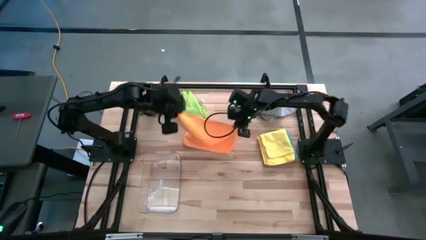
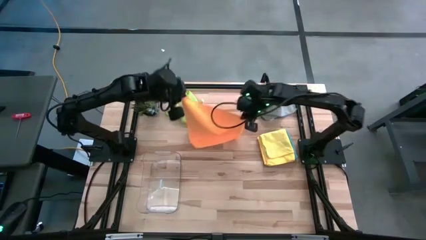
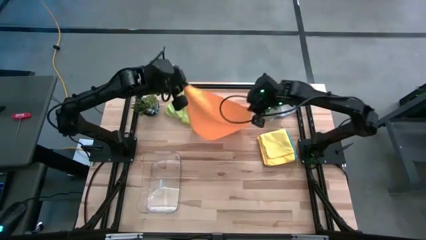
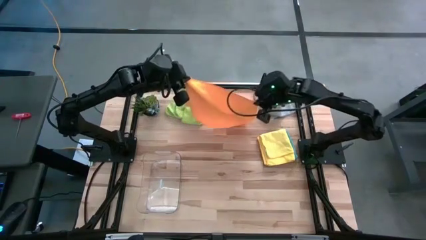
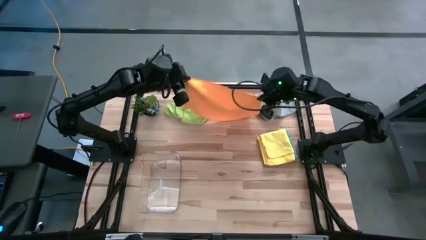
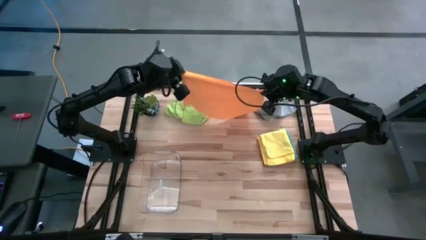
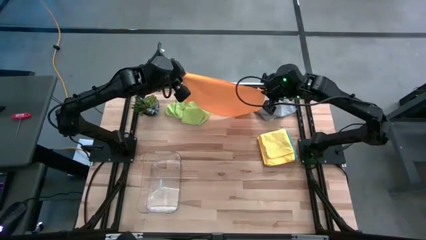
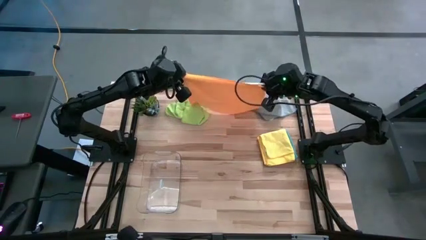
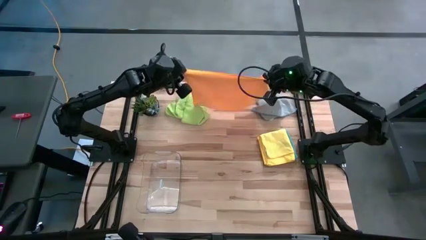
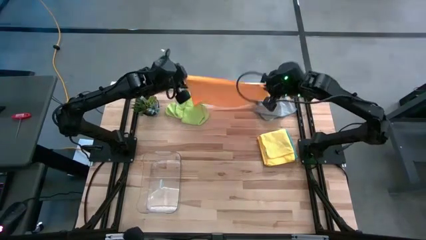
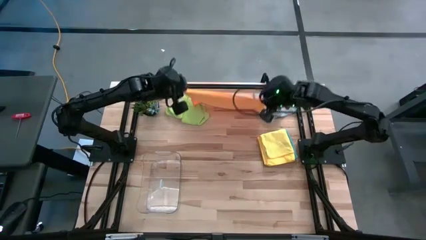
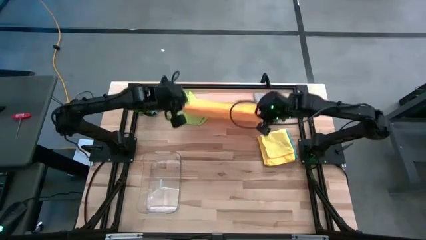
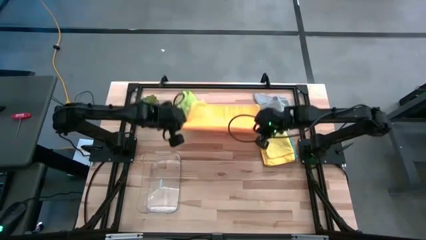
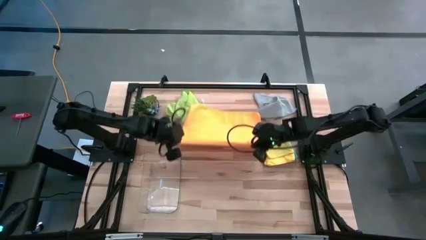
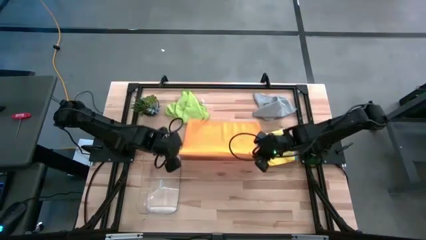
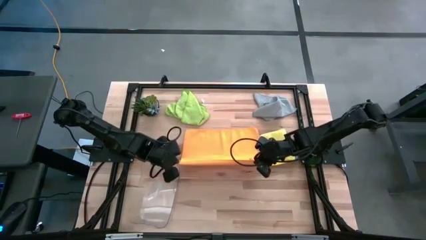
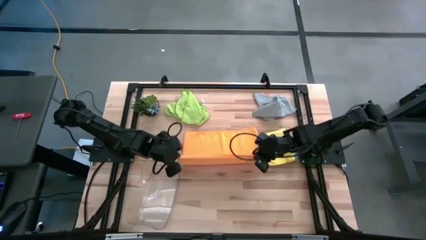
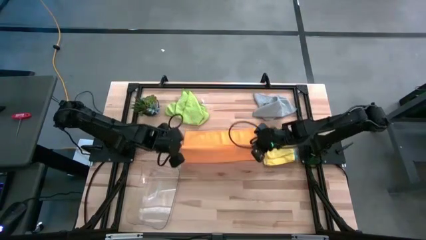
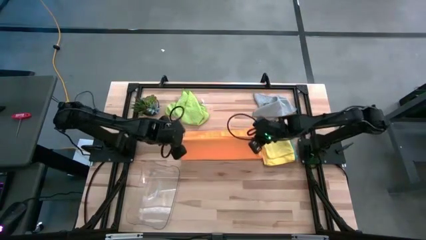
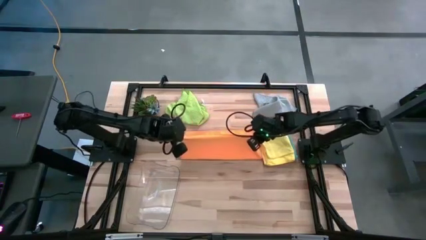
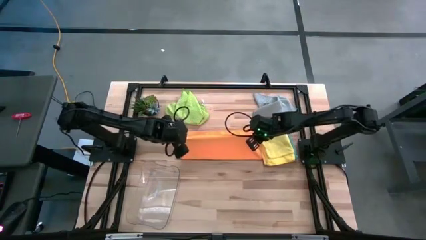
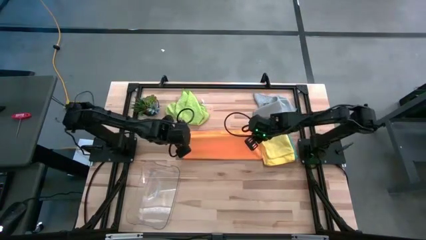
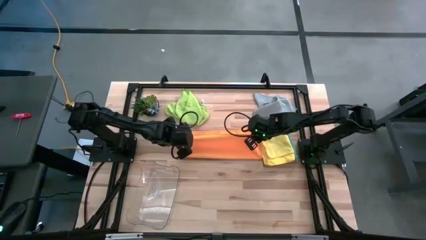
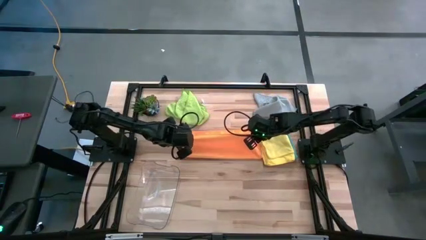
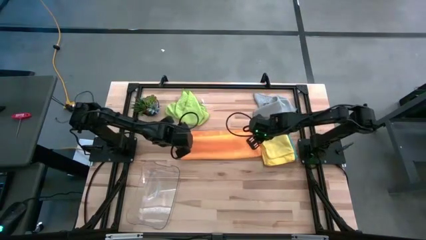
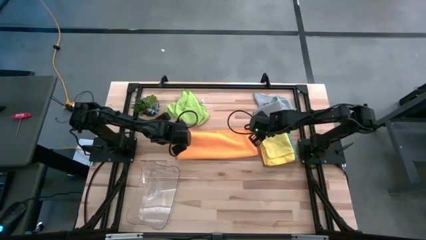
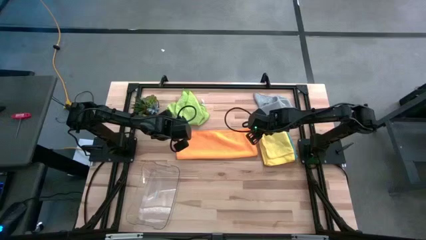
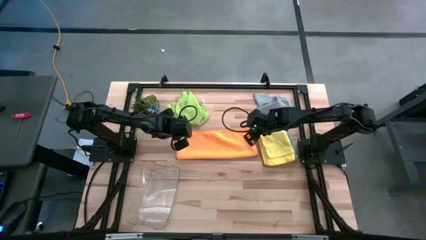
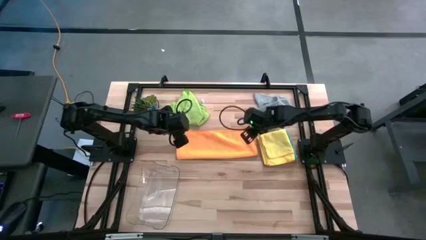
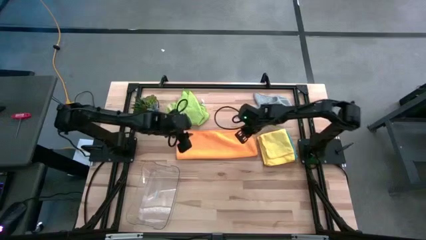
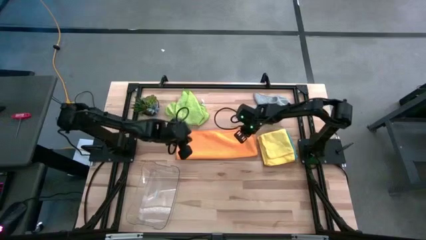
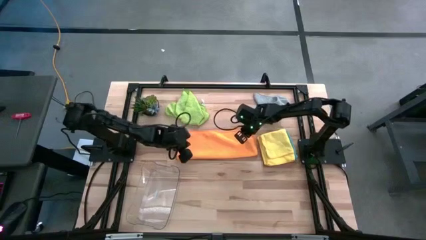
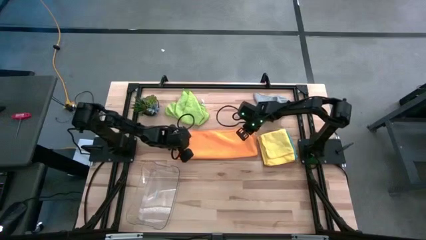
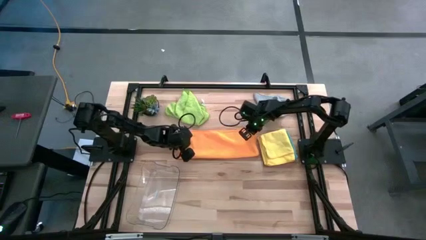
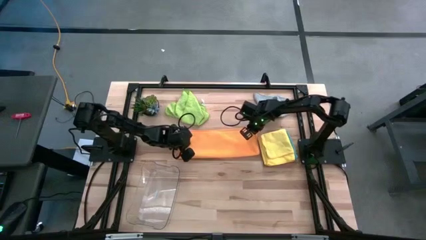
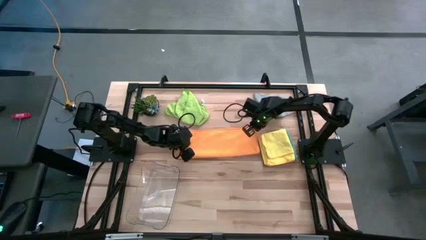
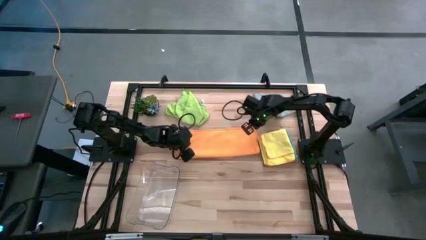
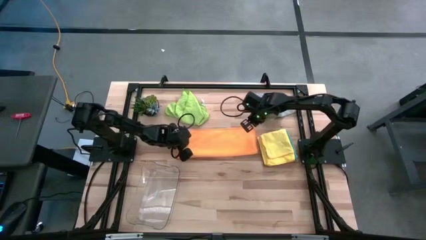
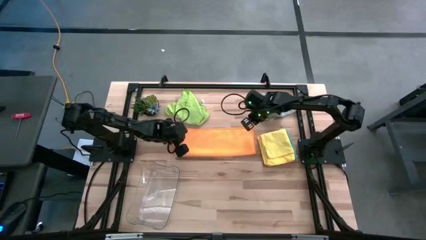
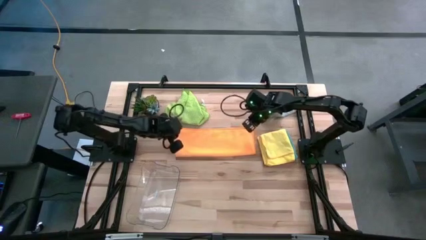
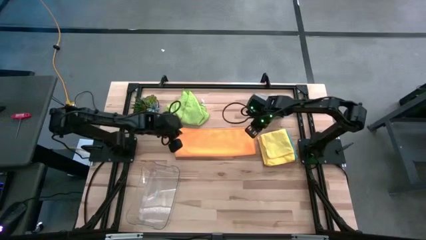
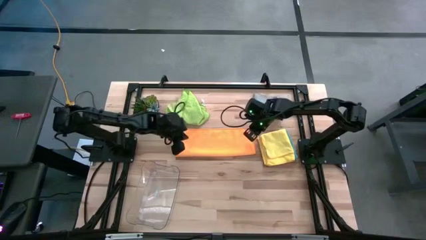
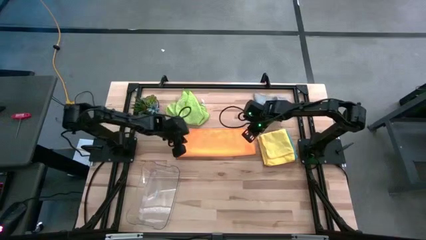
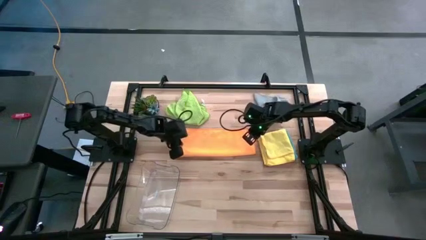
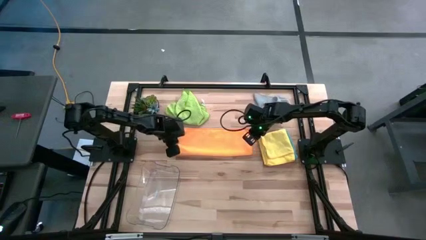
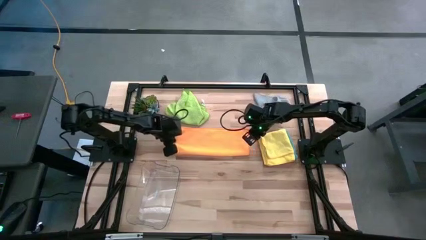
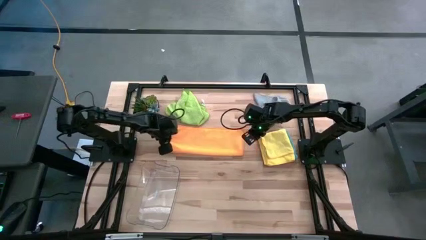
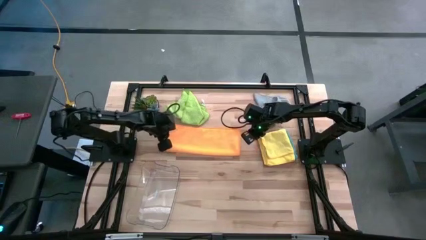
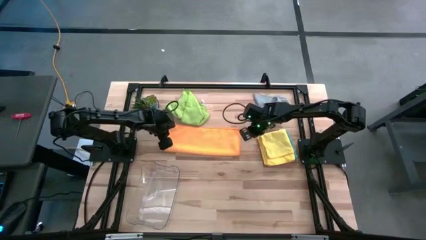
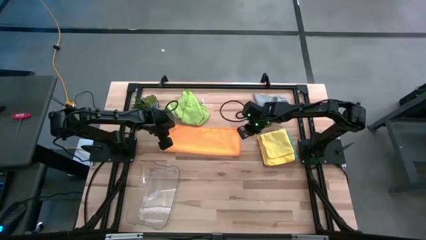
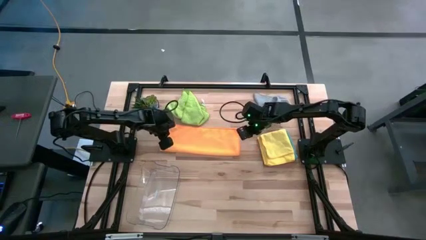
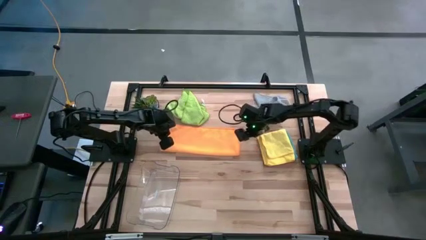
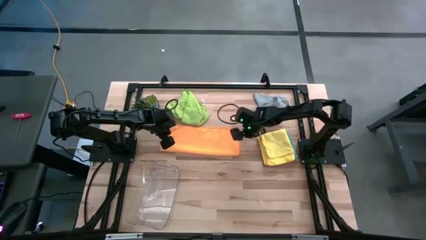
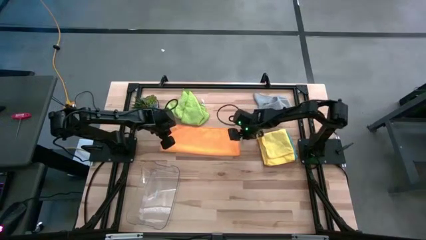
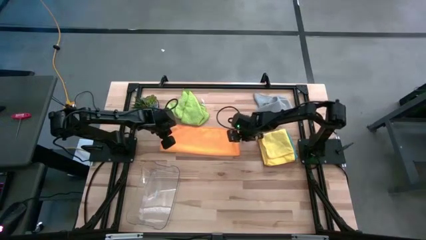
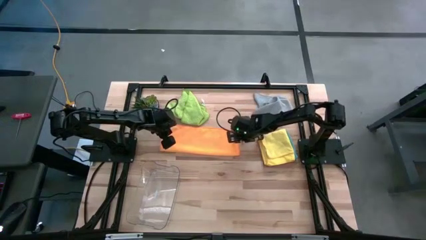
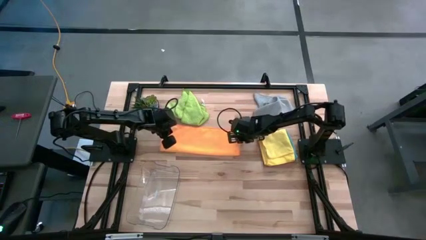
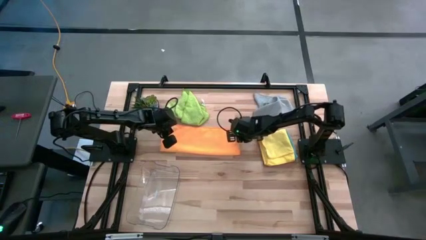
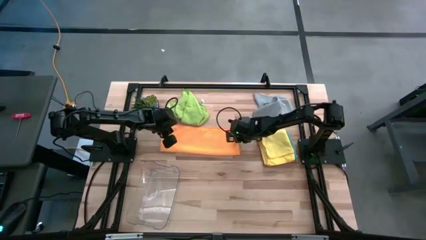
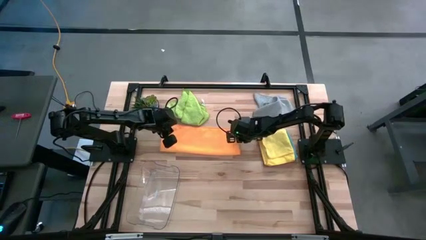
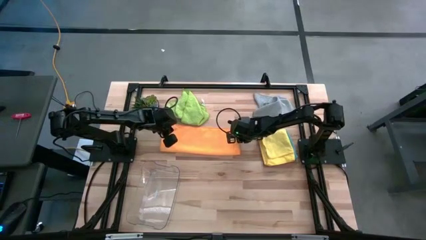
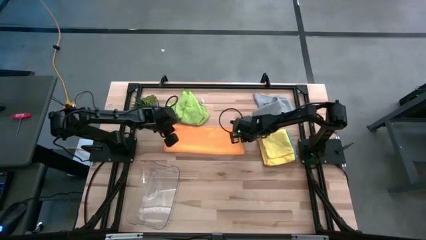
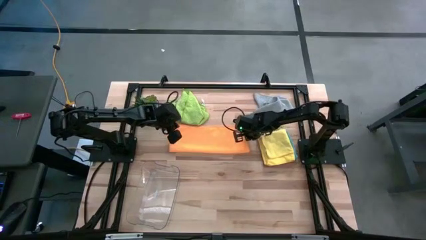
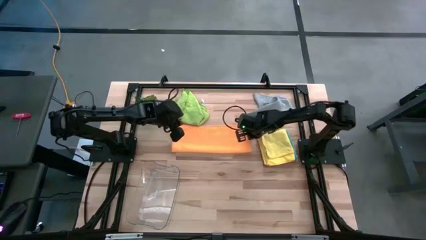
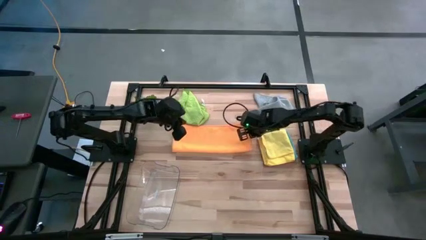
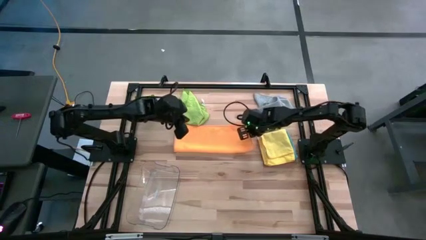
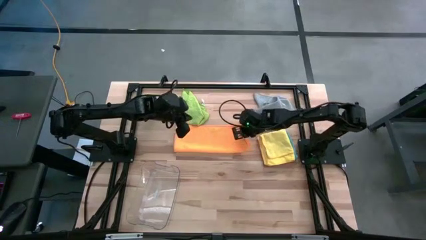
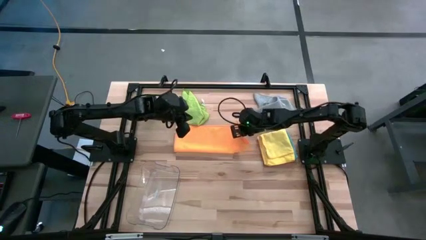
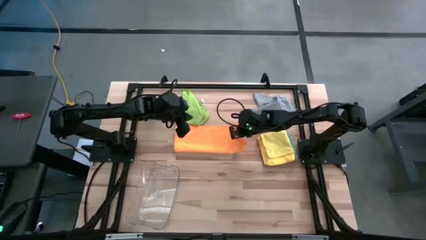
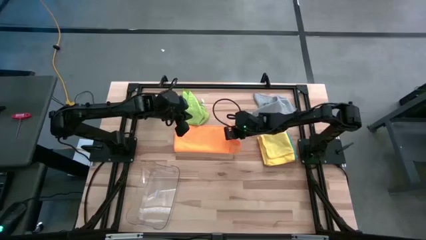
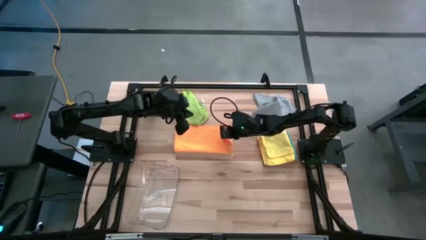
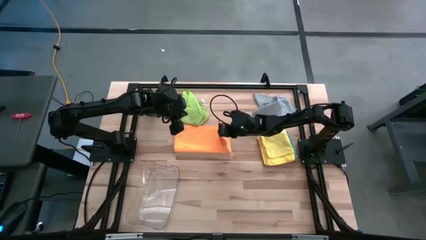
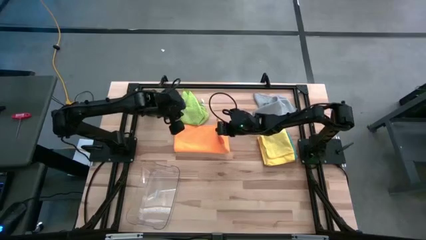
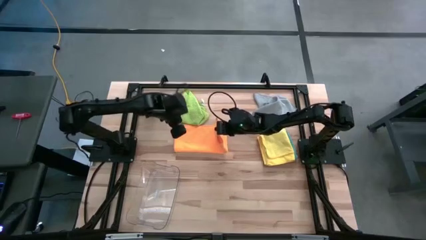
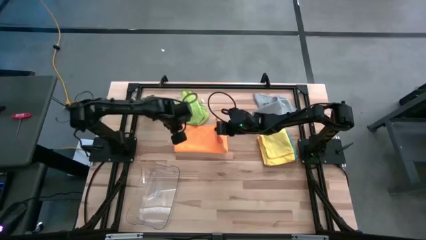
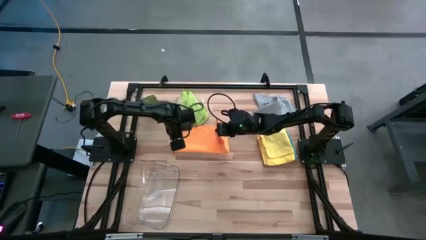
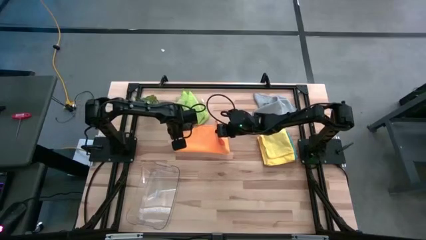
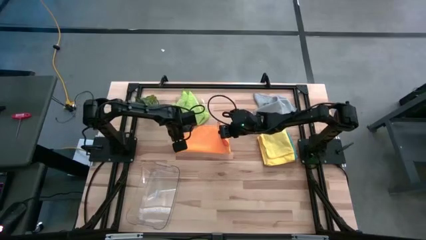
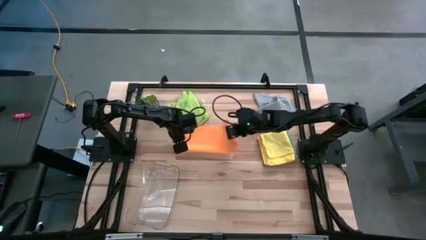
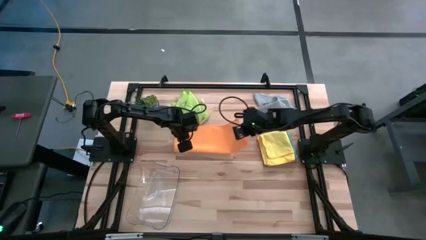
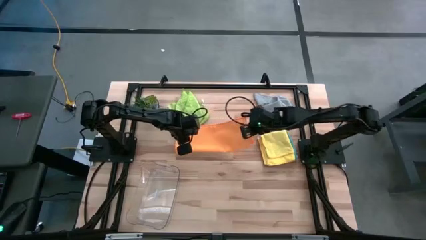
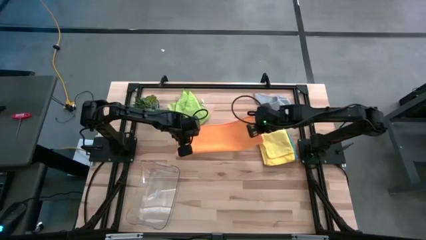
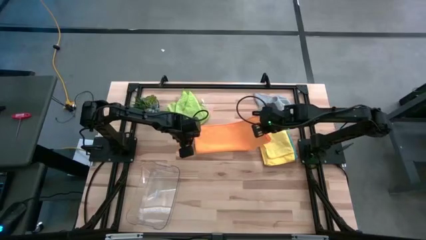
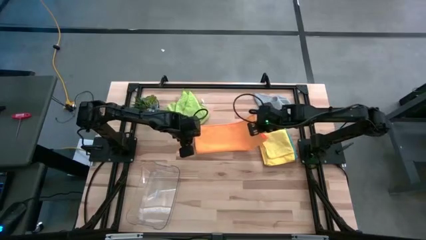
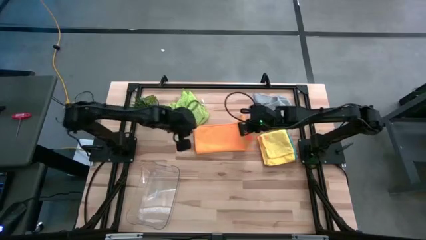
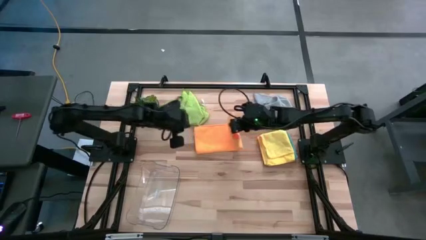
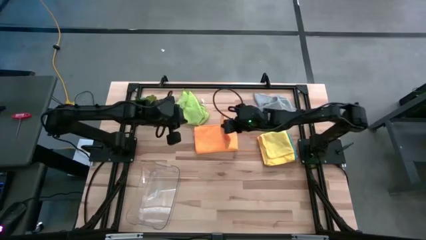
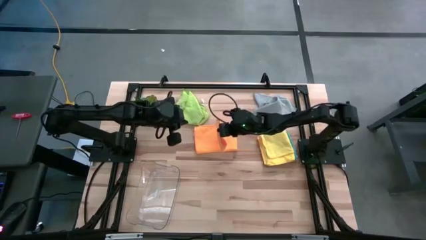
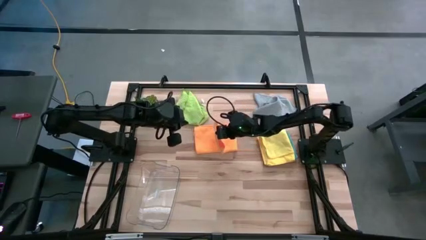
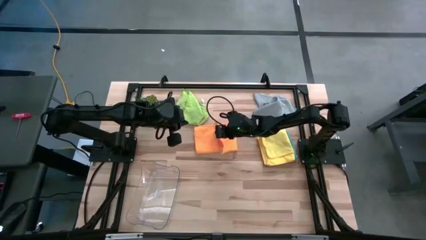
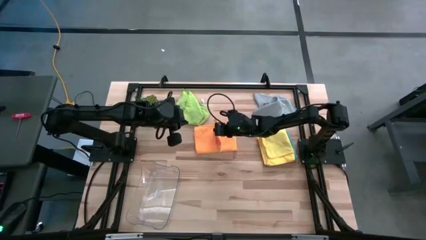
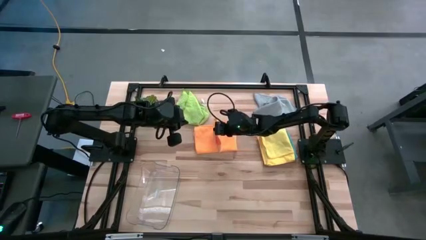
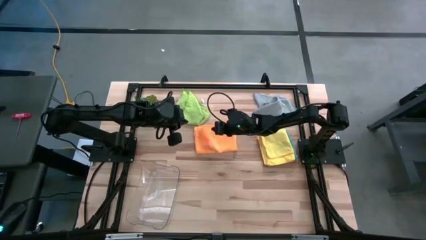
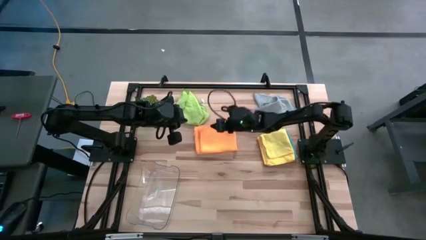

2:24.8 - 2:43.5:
Task: Fold microfiber towels
Fold the orange towel
